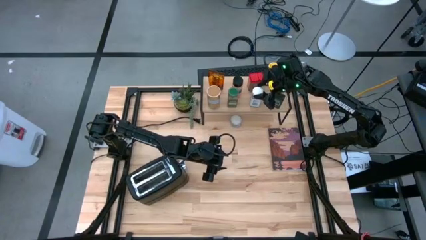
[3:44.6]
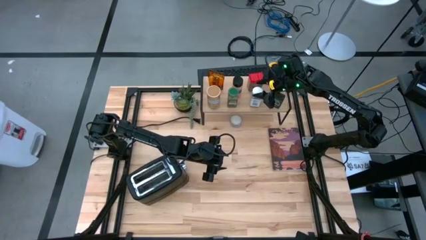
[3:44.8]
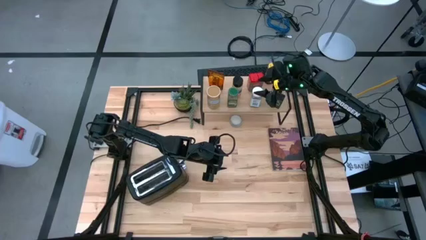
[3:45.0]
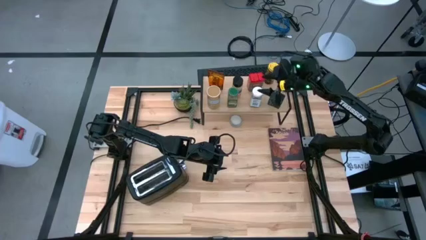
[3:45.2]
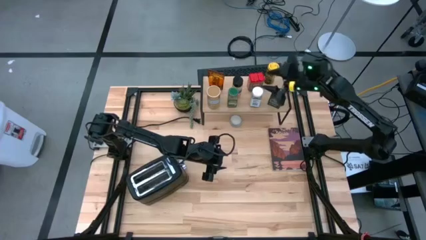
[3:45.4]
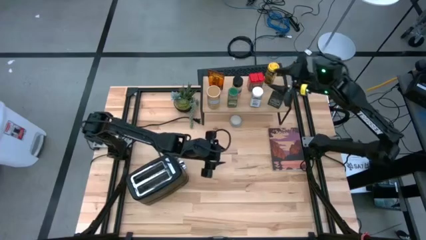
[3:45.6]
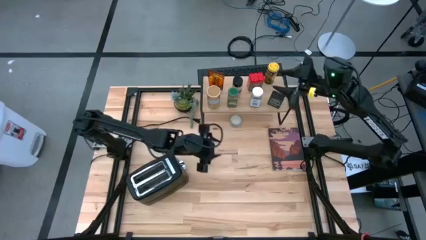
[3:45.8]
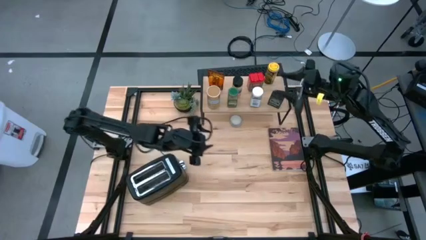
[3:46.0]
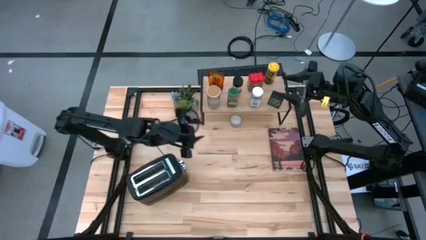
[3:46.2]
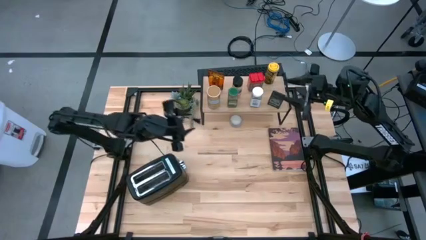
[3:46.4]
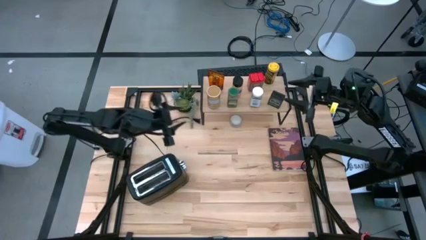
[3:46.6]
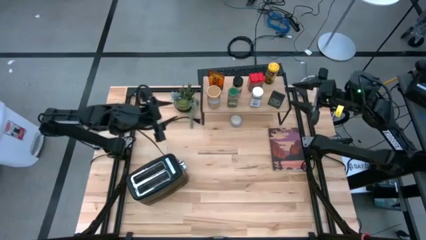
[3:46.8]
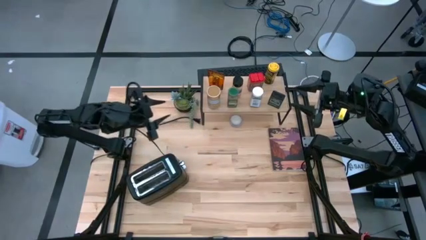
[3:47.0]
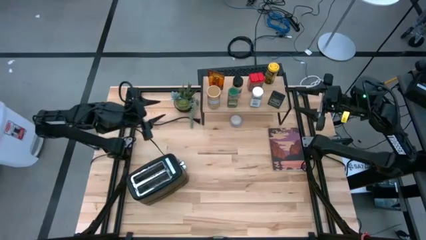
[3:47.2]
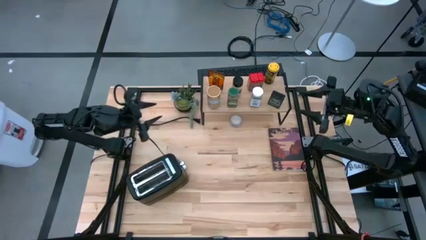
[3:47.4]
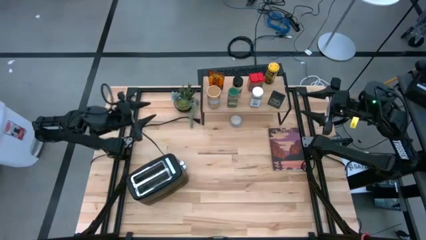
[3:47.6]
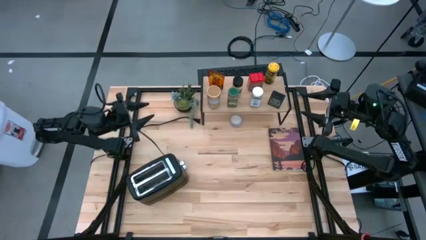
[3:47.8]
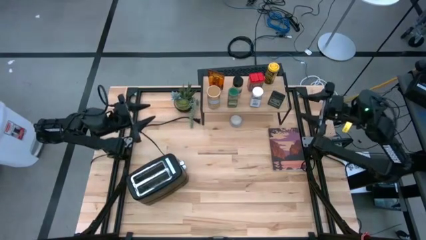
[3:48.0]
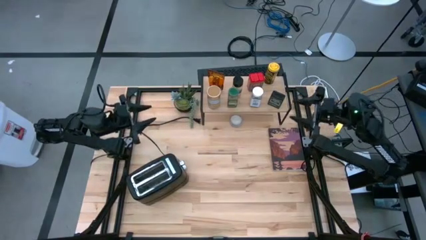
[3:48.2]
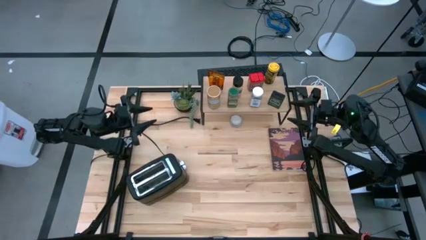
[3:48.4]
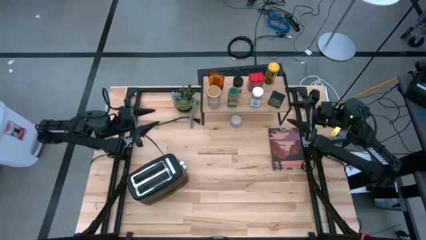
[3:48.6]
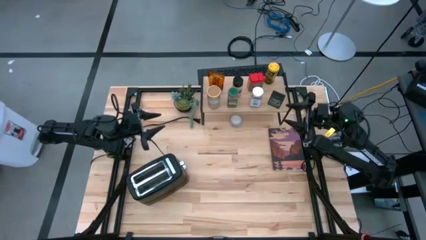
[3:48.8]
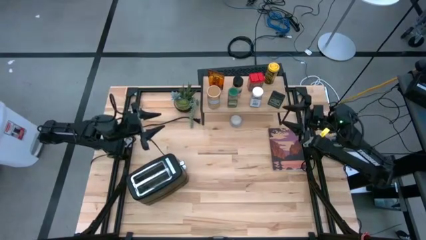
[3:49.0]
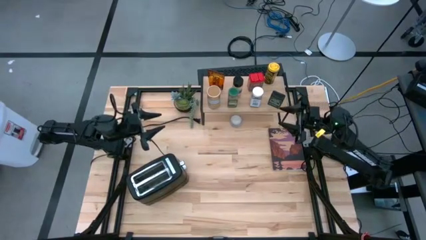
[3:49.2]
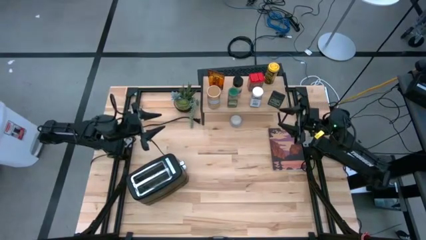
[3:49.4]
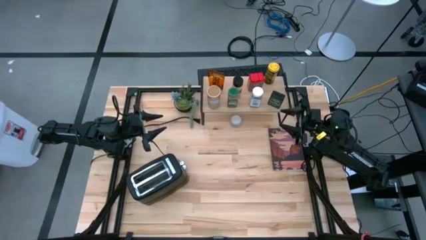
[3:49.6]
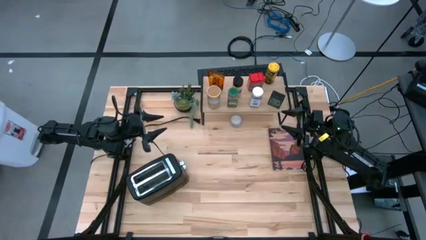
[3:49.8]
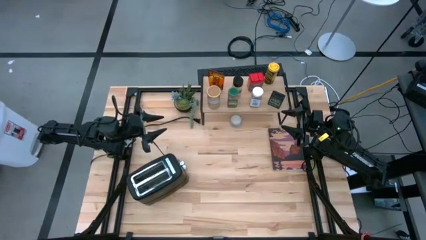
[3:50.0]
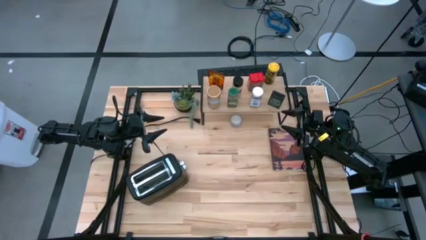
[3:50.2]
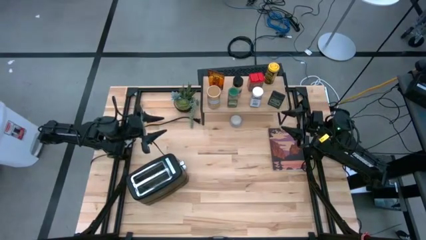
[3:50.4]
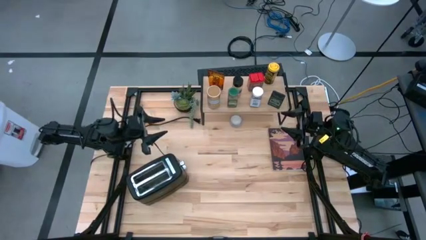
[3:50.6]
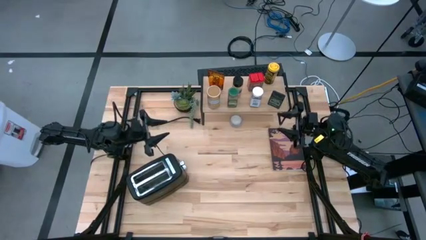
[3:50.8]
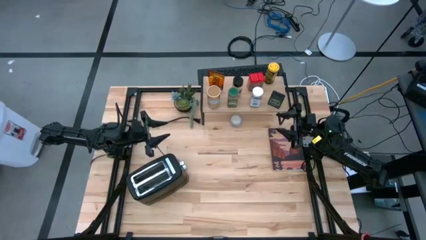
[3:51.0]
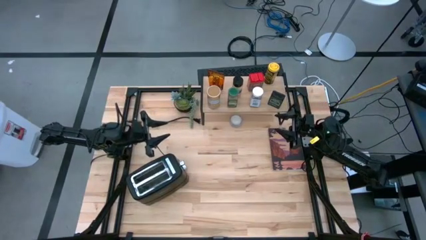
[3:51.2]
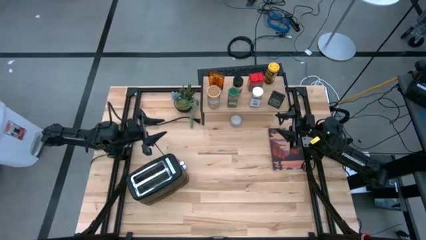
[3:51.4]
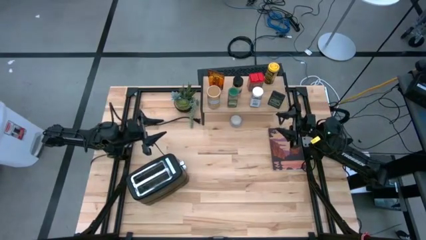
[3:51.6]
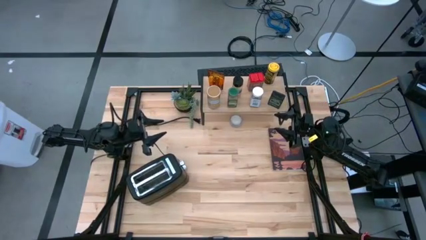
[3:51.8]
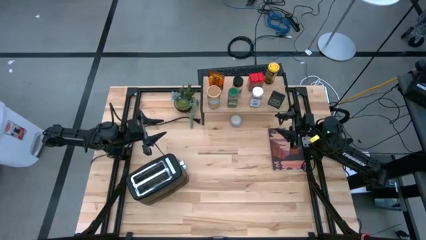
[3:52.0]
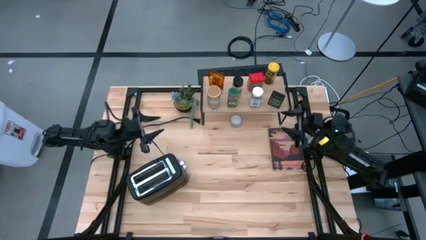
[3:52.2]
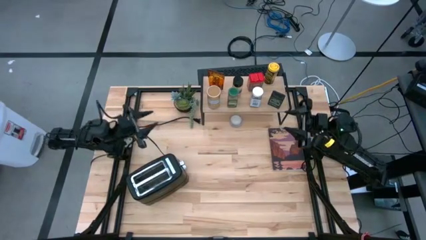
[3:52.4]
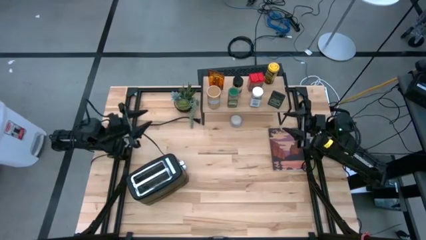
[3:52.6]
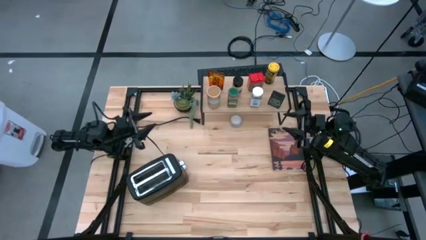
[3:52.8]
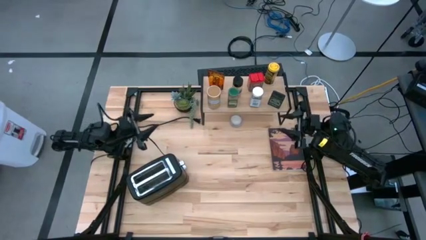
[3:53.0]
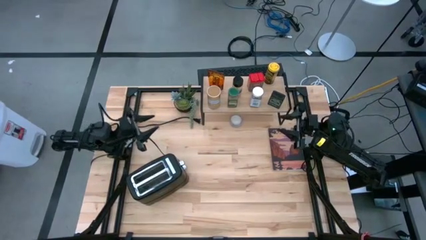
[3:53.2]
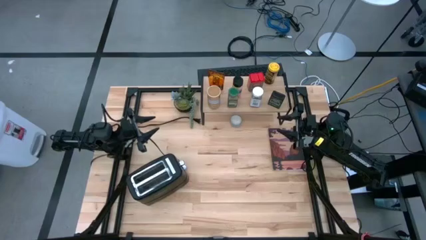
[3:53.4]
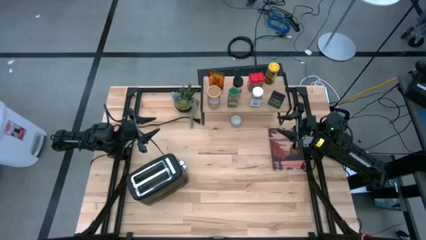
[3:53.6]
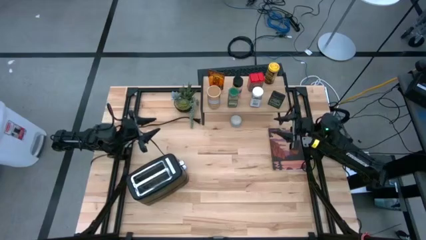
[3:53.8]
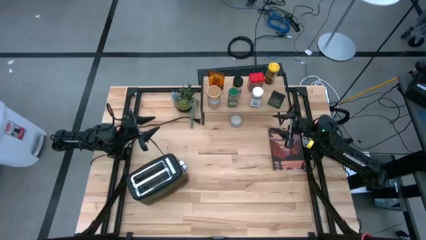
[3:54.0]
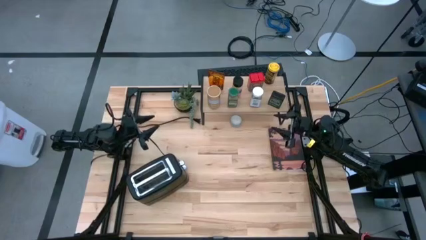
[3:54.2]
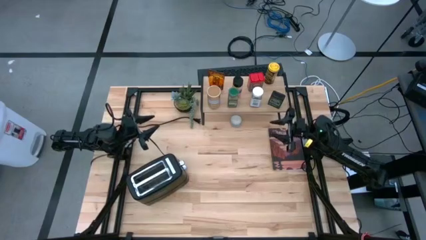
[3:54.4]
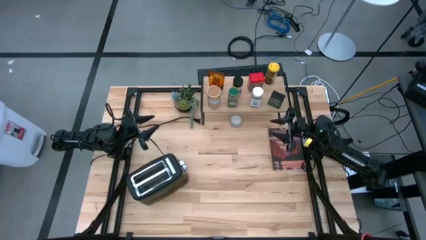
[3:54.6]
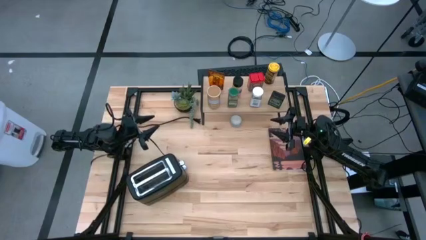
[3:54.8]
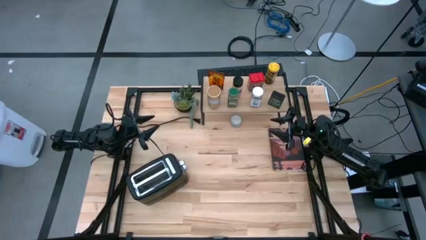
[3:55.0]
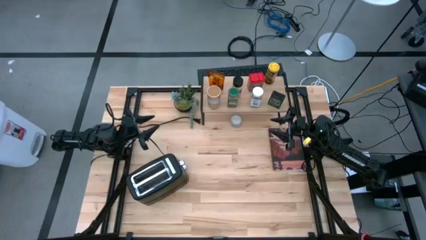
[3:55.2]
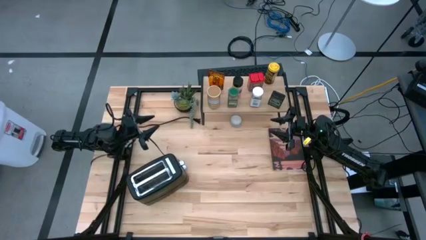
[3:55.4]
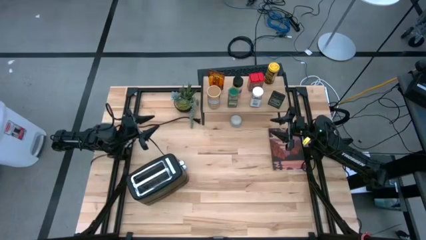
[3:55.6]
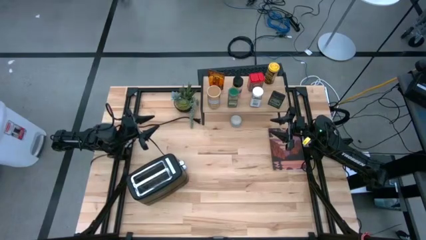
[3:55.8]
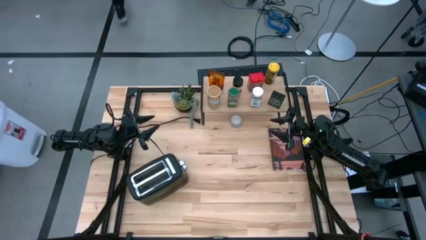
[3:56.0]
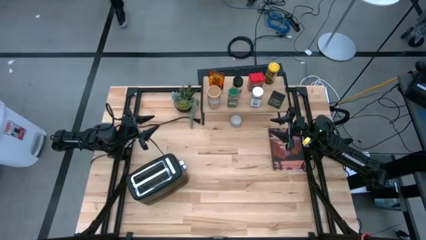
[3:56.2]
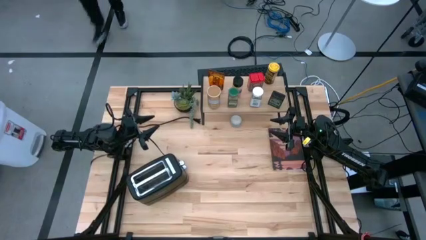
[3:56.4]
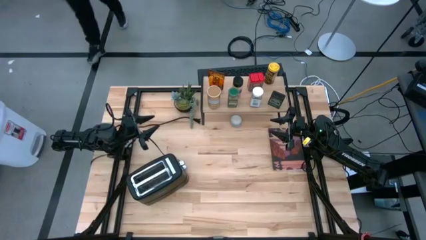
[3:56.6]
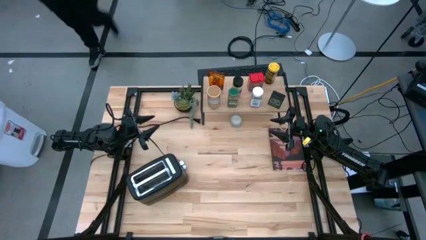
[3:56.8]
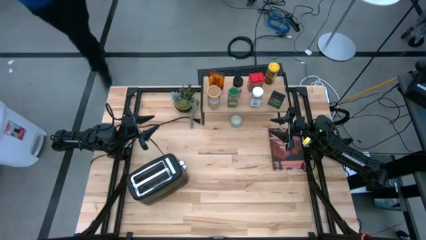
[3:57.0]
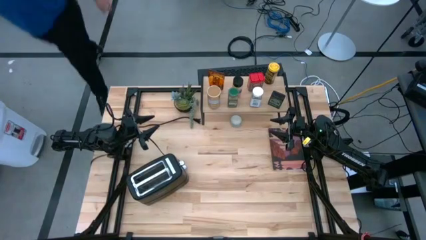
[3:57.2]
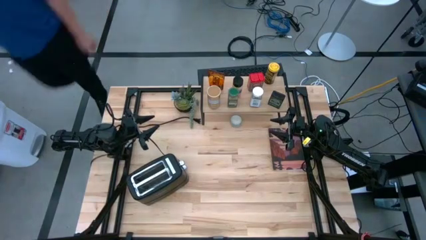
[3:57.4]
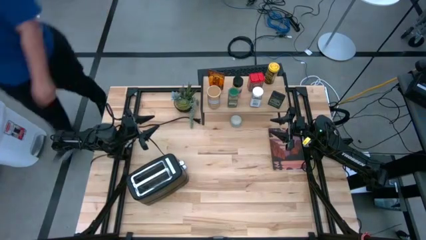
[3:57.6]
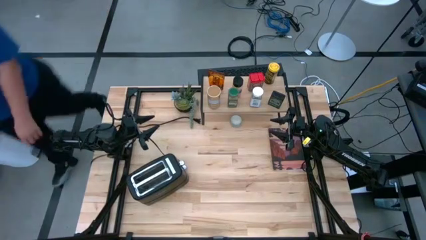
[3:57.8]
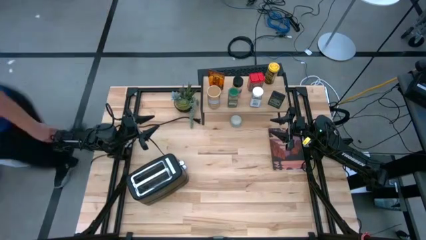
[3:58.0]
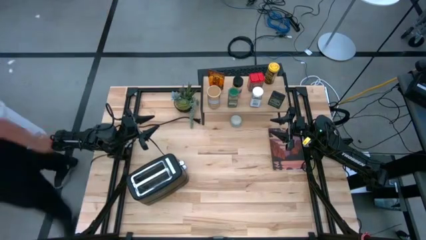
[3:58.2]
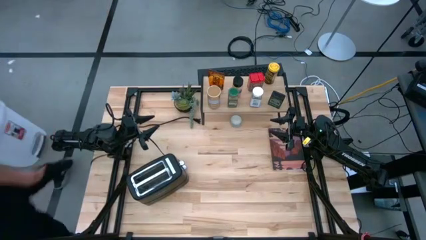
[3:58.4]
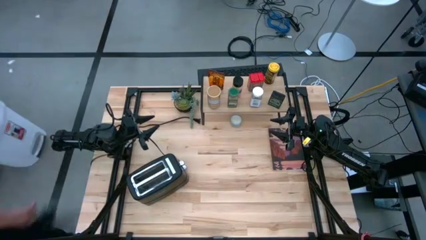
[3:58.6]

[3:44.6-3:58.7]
Task: Shelf spices
Return to Home Position

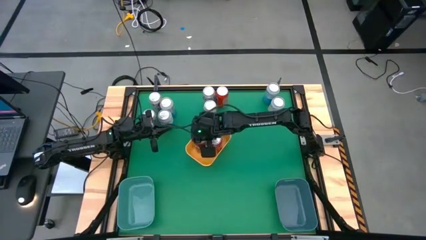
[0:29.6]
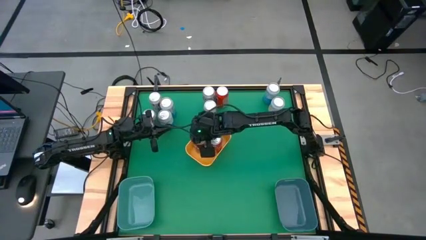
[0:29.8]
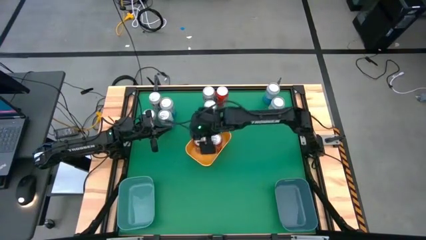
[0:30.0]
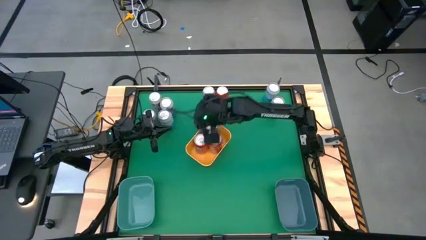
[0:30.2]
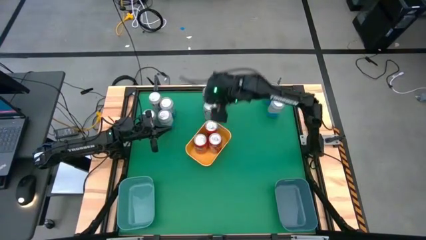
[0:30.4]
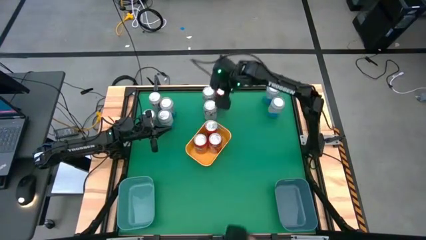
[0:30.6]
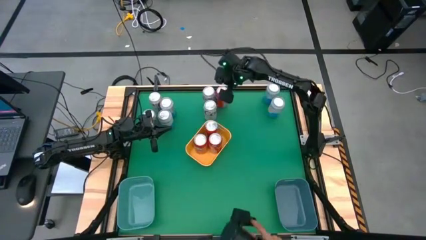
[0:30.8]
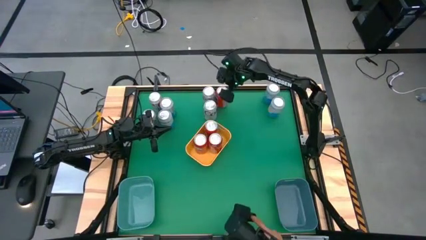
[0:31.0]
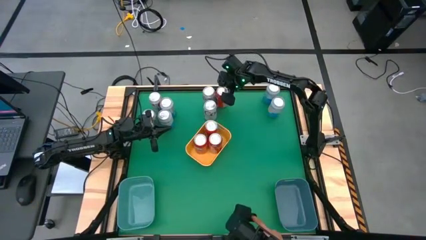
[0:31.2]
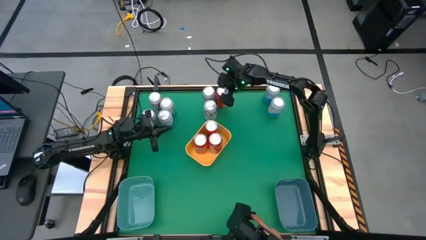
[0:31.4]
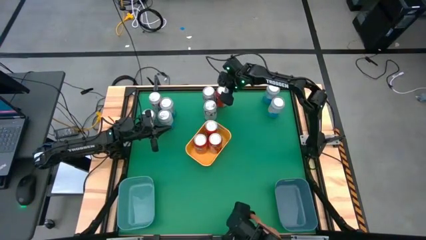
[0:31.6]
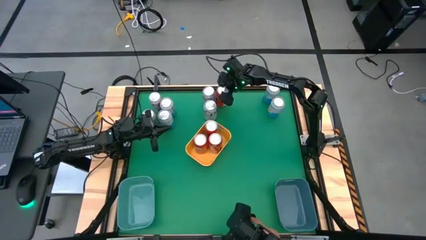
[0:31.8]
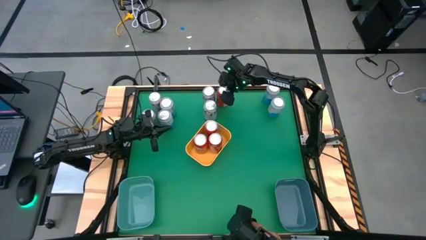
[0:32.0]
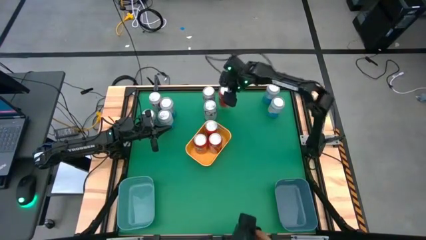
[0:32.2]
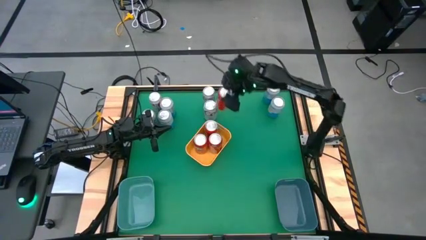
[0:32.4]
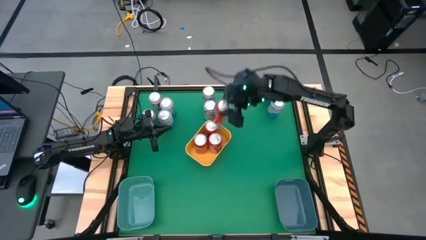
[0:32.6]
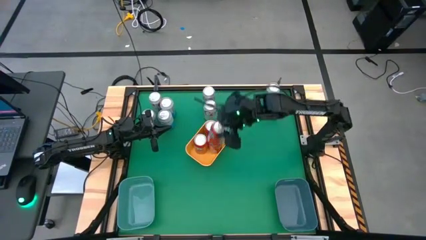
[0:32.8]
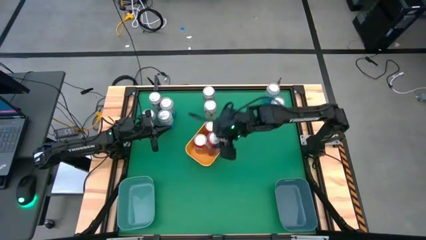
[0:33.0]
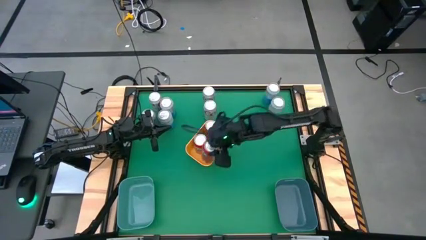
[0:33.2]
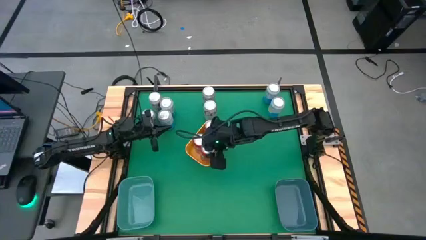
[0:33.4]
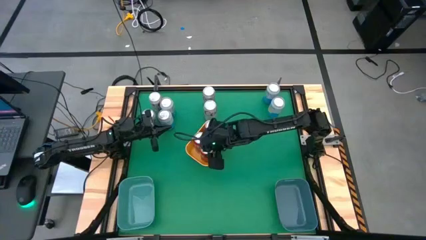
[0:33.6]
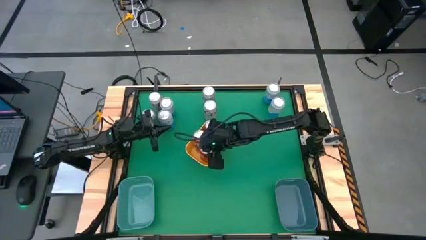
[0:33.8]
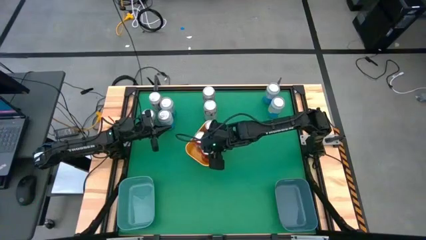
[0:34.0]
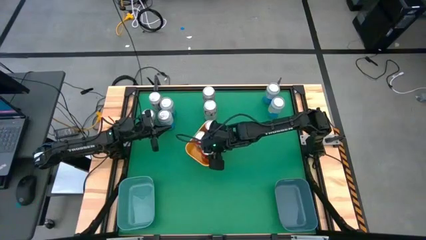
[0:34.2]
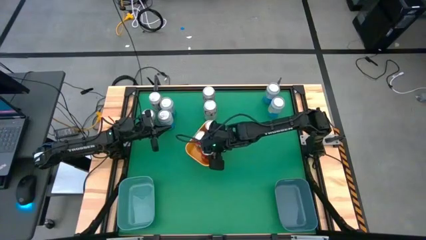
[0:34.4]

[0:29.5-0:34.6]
Task: Sort soda cans
Put the orange soda can into the yellow bin
